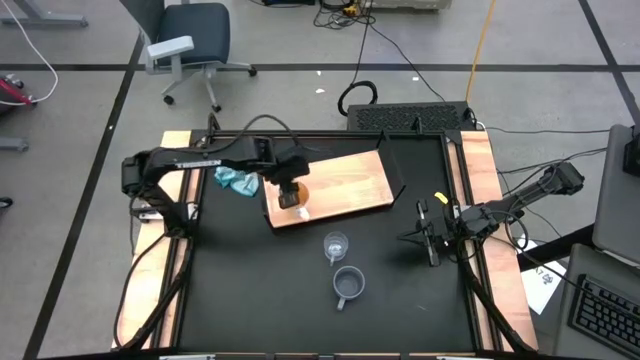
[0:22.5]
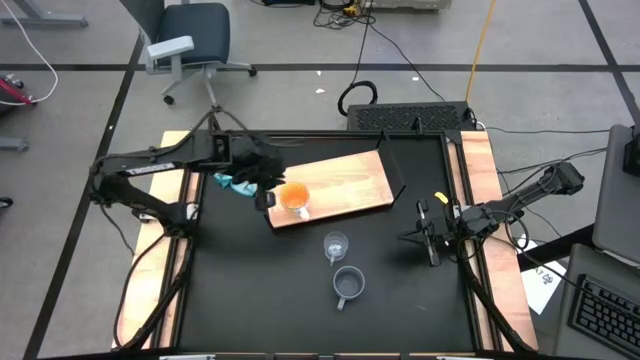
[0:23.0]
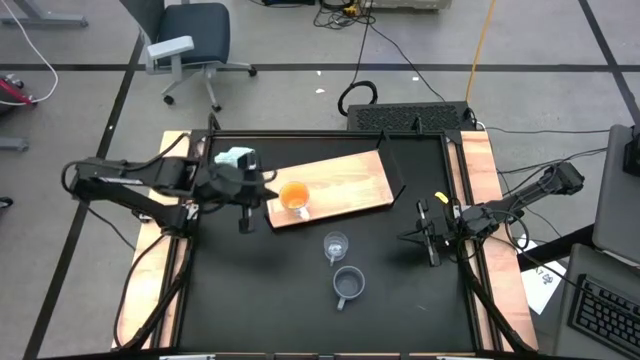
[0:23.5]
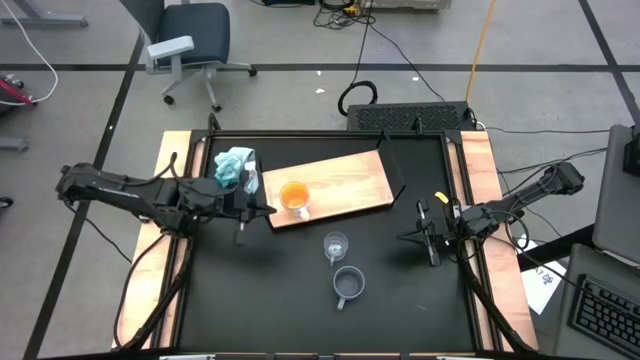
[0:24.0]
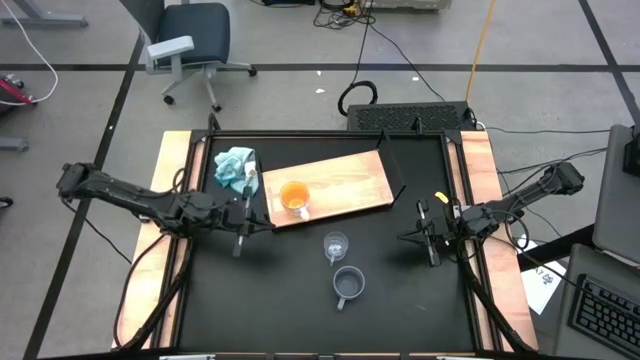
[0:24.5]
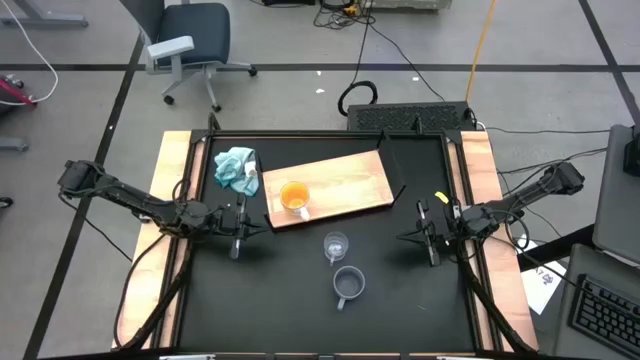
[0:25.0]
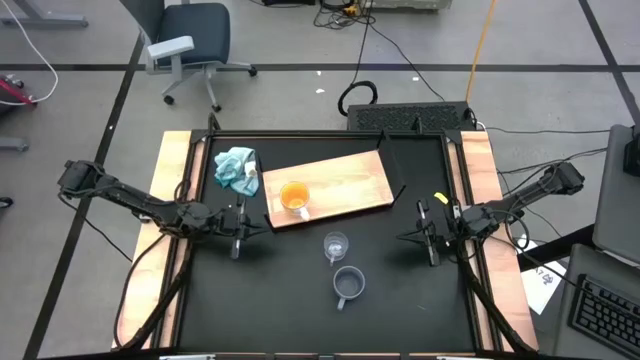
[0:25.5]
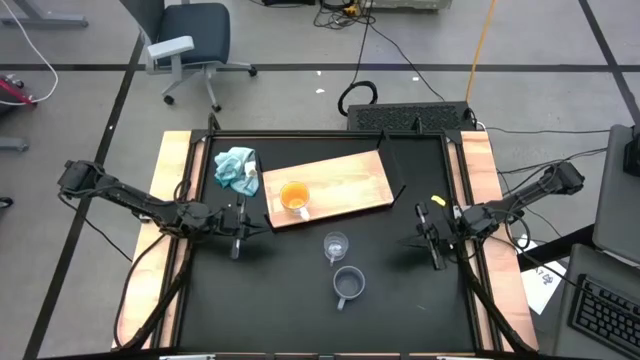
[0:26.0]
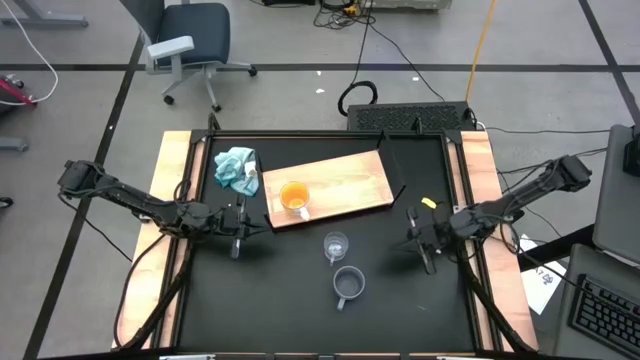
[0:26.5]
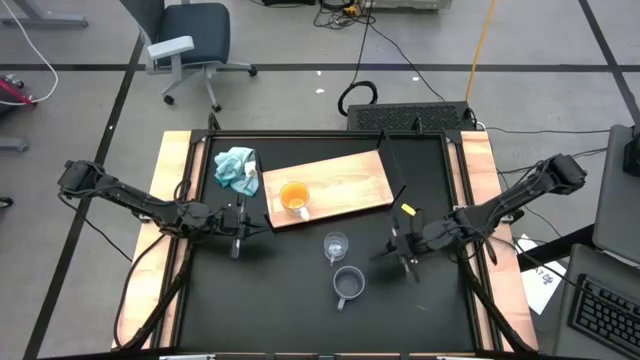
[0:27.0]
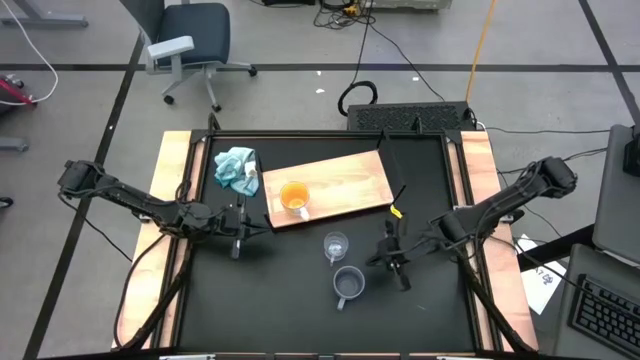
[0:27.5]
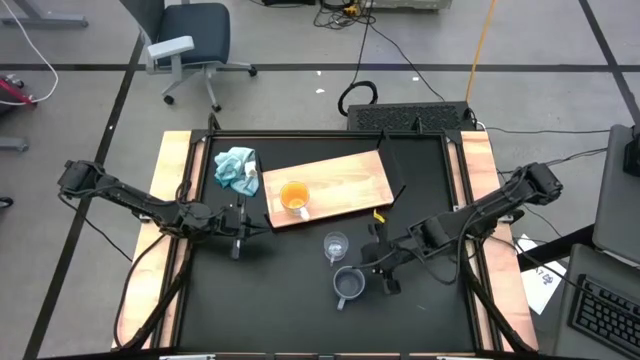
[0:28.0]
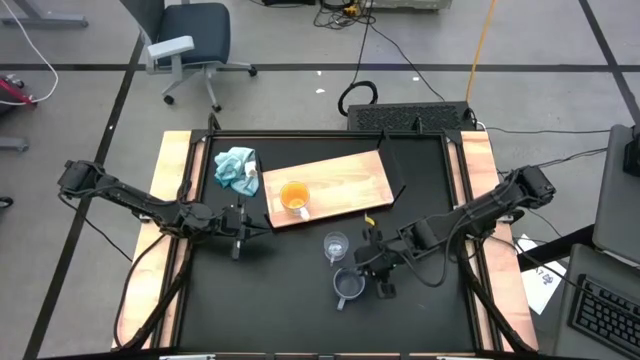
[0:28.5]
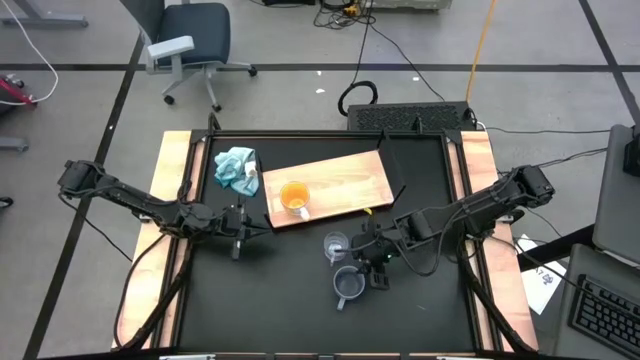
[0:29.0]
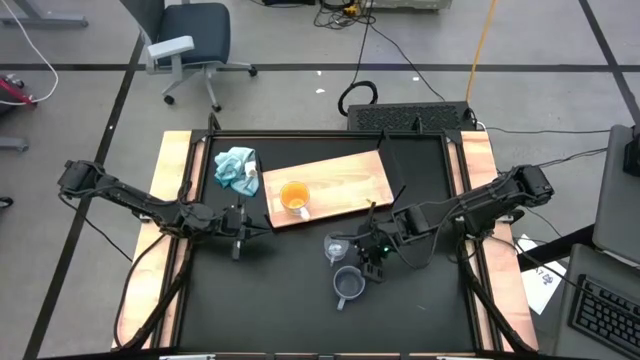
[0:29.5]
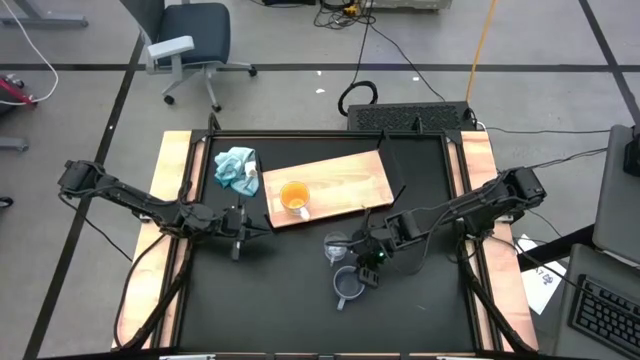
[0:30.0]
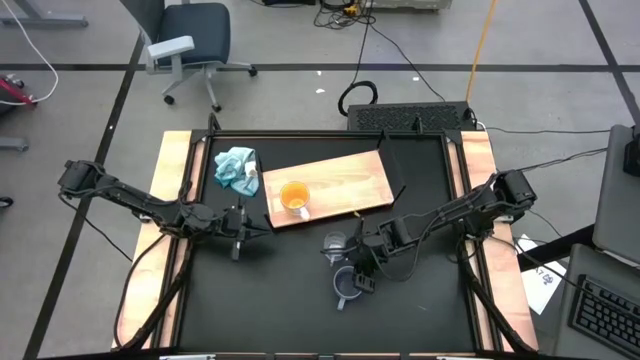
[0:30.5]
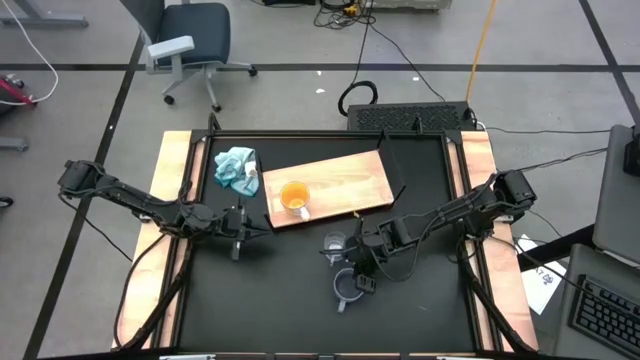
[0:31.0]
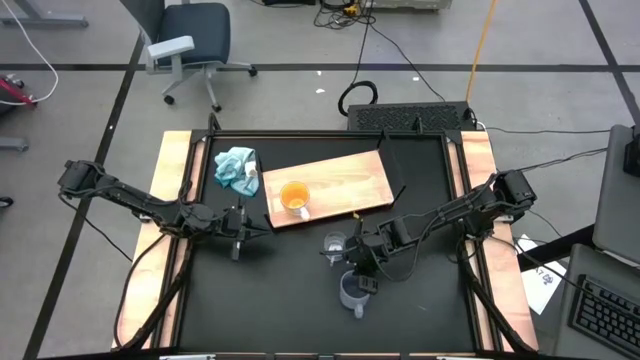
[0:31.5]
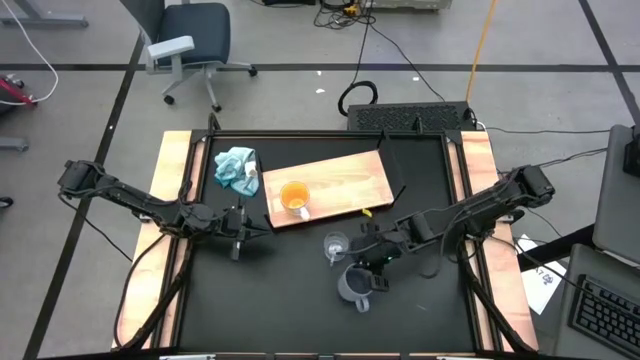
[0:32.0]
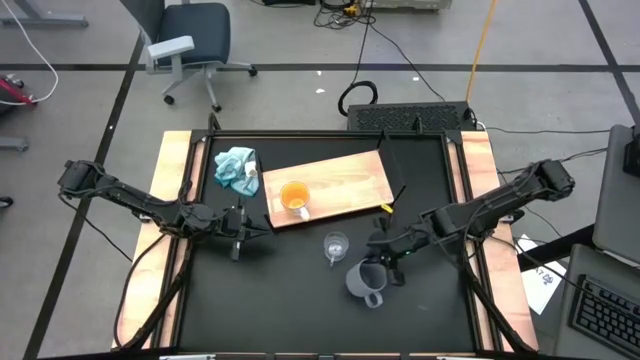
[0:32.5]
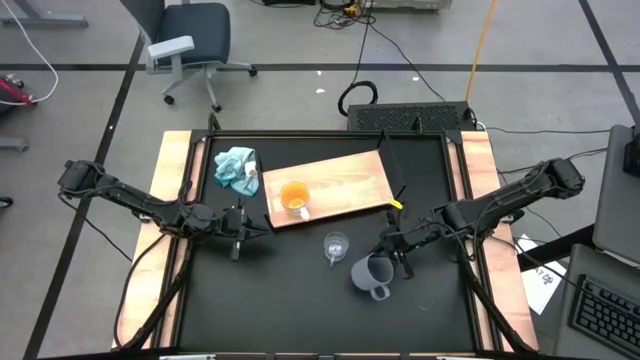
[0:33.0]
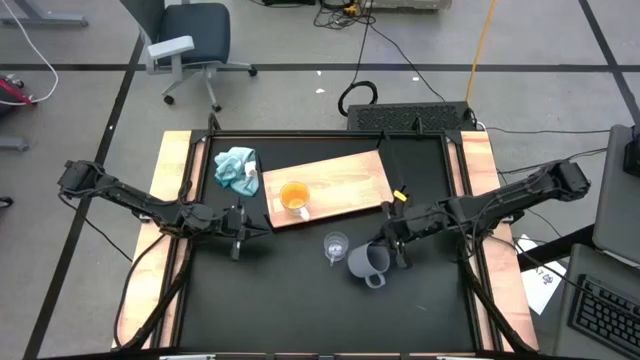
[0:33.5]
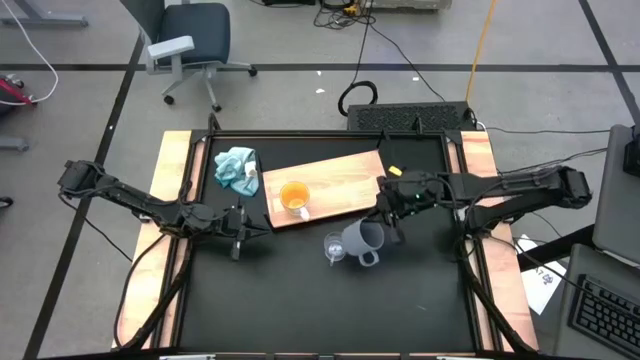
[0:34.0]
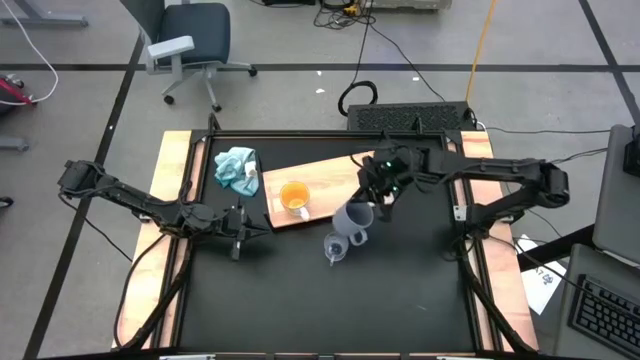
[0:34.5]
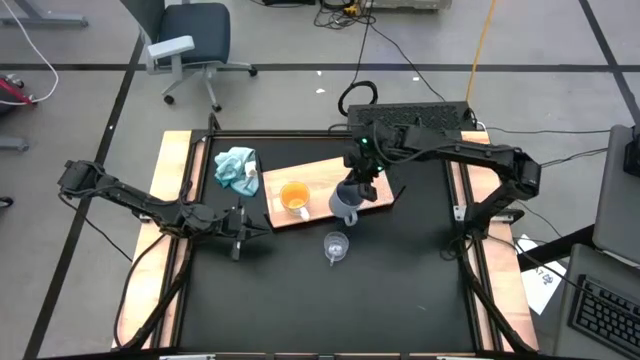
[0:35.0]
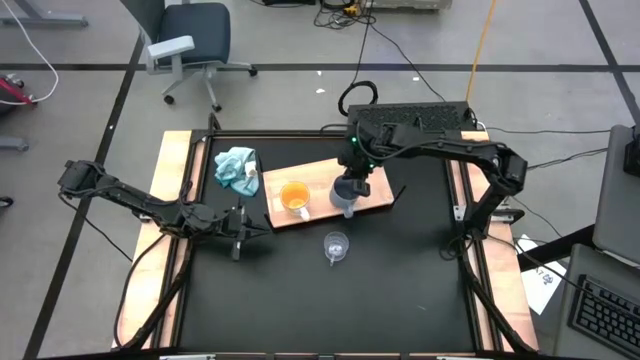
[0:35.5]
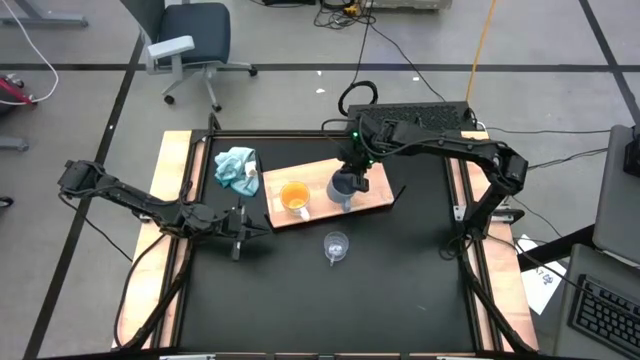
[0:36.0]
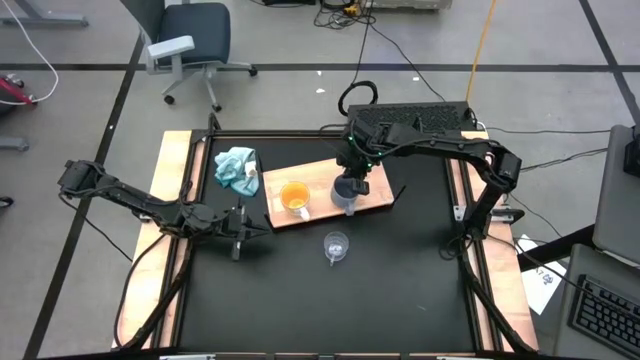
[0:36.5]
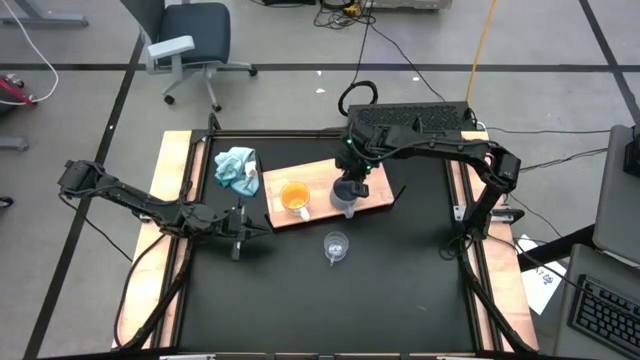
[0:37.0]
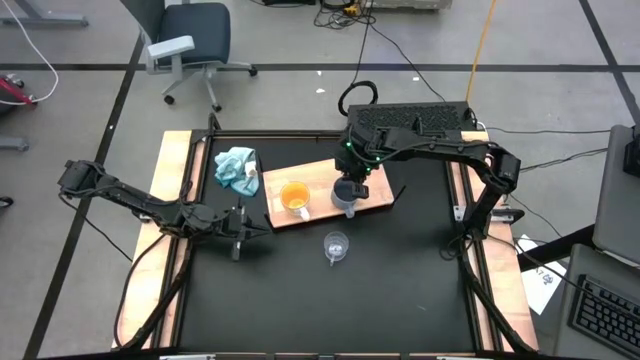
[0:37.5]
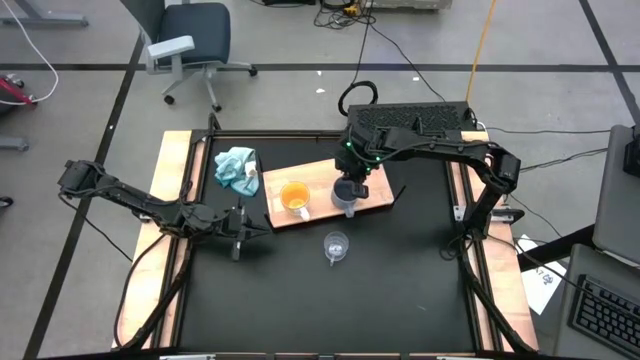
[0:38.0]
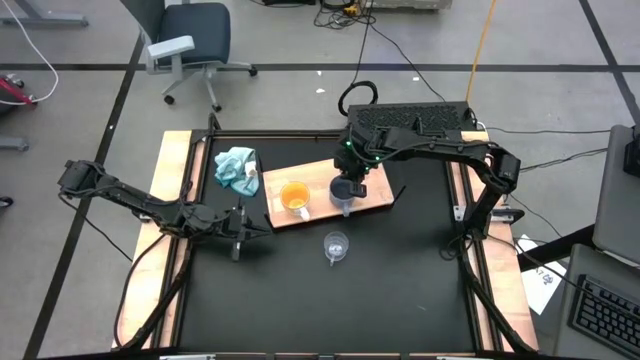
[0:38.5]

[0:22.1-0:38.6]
Task: Stack small to large cups/mugs on shelf
Put the blue mug onto the shelf

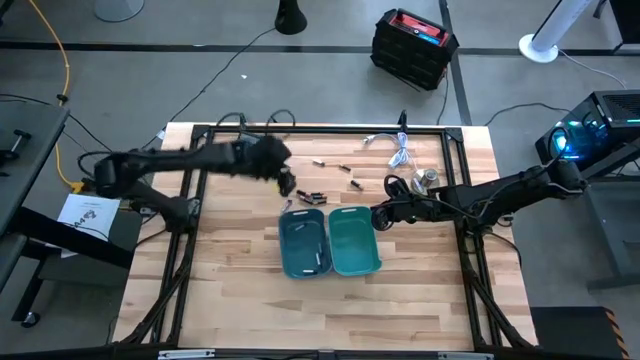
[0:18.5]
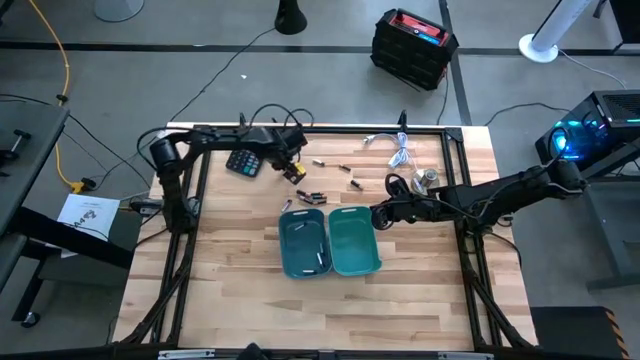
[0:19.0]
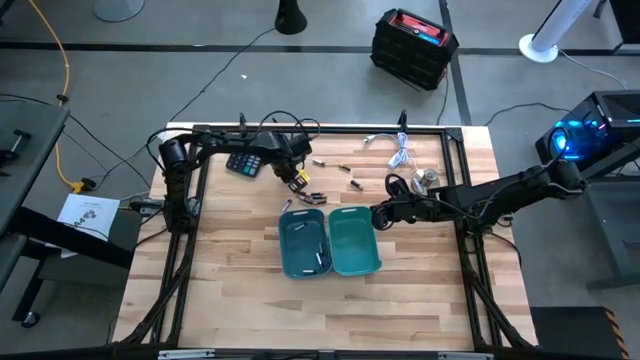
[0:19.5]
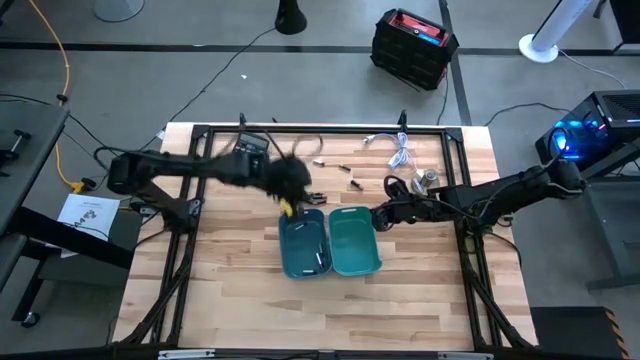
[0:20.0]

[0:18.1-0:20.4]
Task: Sort batteries
Put the silver battery into the blue bin
